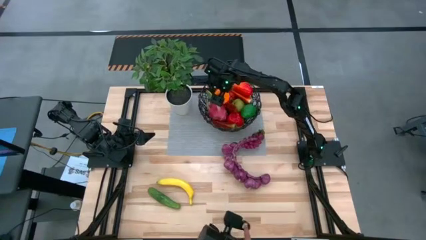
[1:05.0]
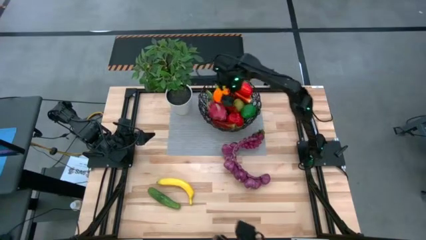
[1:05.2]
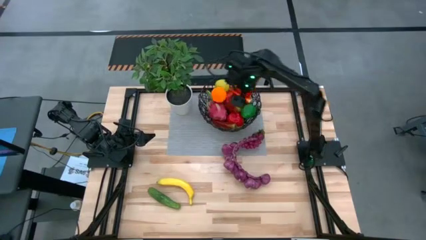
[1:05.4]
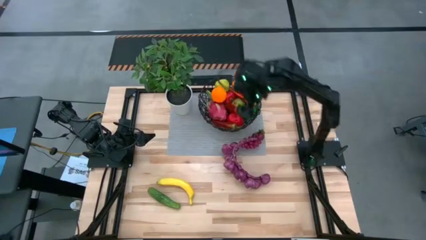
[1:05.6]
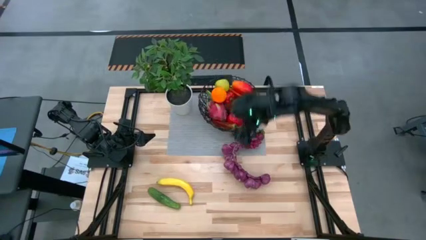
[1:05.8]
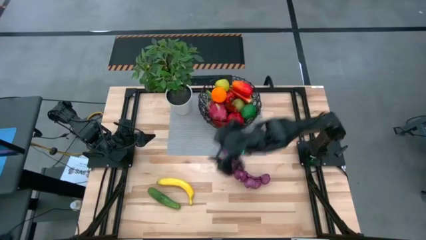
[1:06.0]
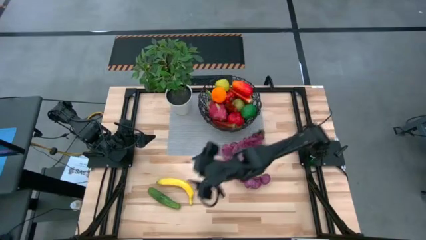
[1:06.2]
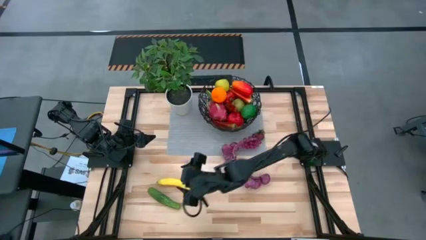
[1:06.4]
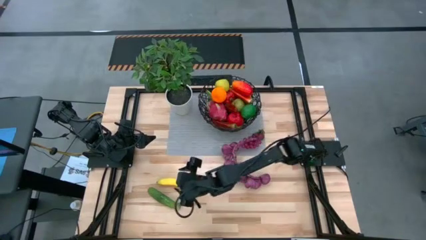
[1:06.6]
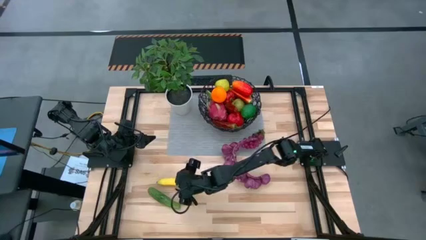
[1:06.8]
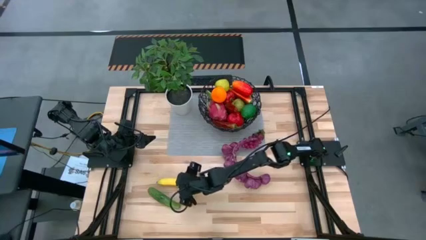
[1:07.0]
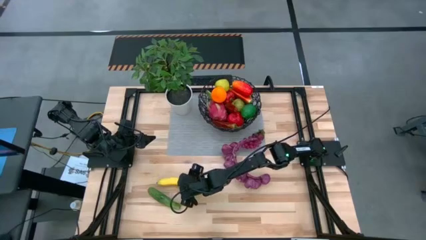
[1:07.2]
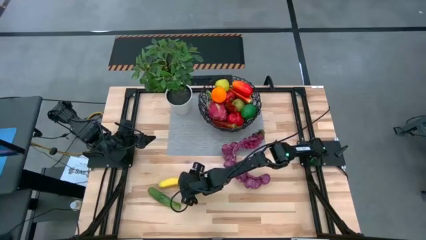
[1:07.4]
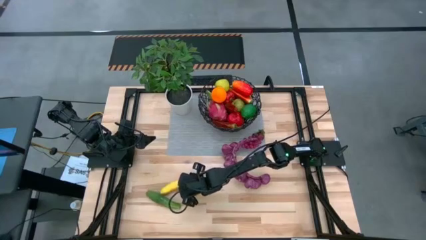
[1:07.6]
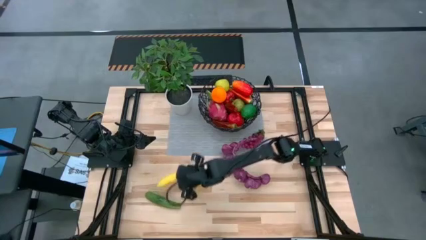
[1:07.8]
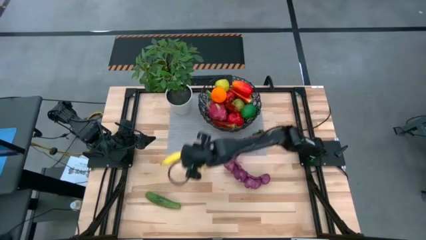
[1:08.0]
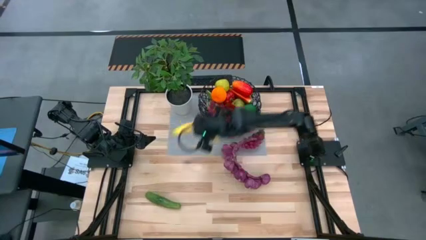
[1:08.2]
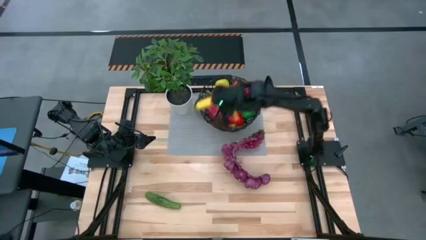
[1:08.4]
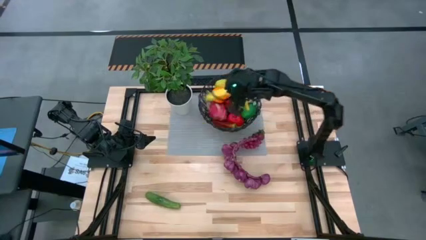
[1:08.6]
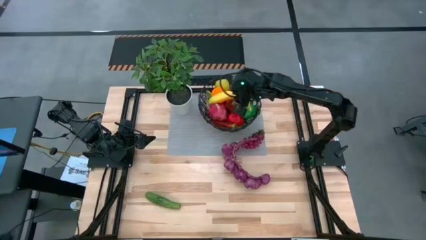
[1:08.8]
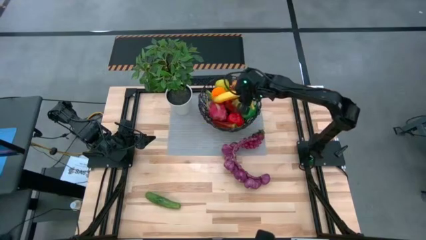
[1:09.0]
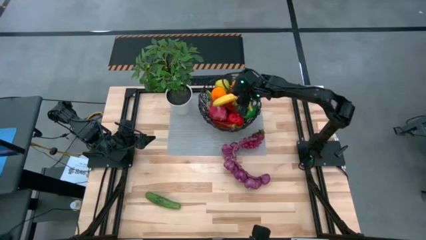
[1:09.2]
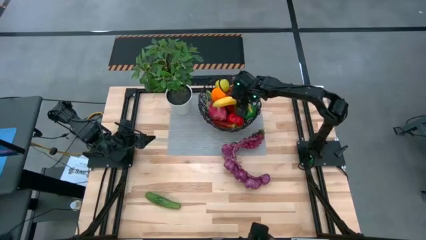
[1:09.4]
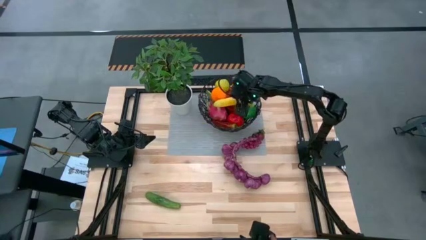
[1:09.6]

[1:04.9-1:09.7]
Task: Build produce basket
Put the yellow banana into the black wire basket

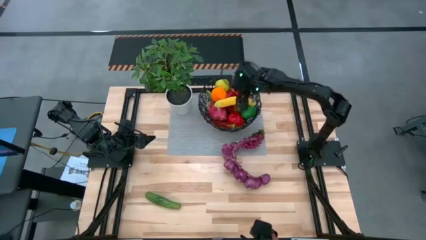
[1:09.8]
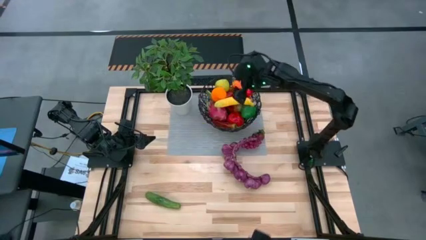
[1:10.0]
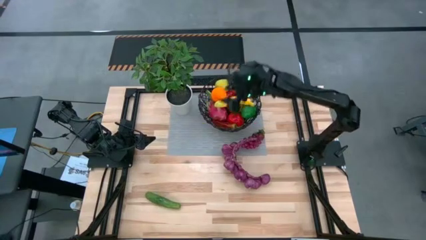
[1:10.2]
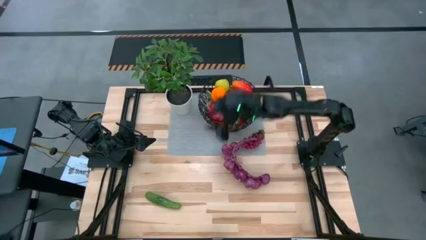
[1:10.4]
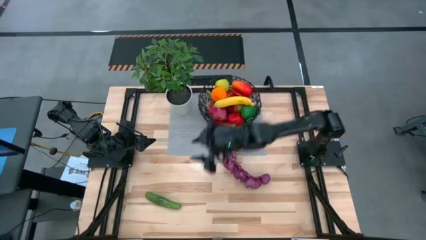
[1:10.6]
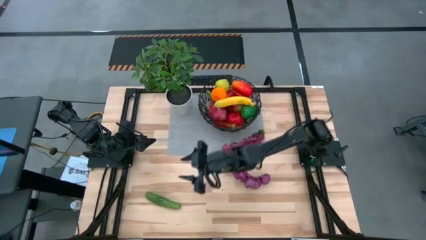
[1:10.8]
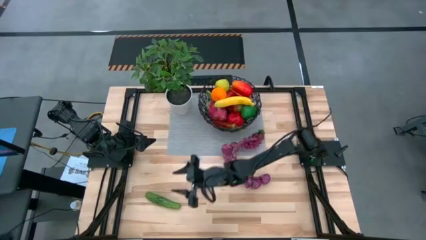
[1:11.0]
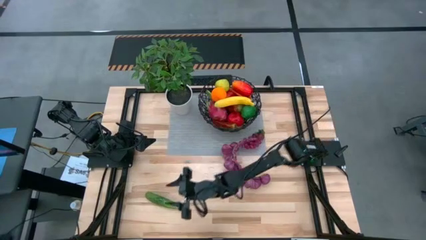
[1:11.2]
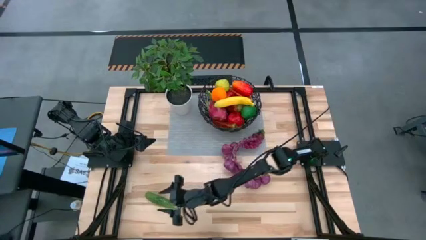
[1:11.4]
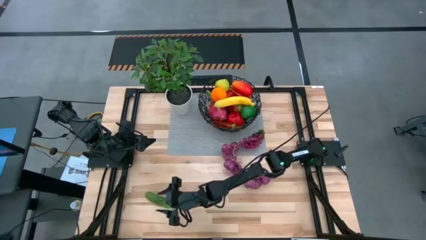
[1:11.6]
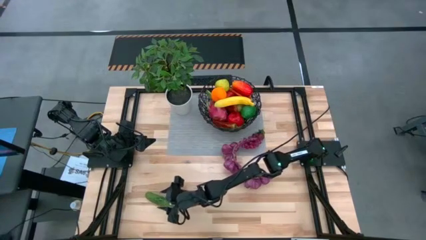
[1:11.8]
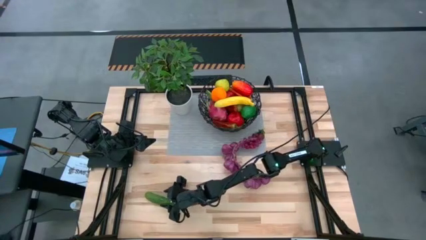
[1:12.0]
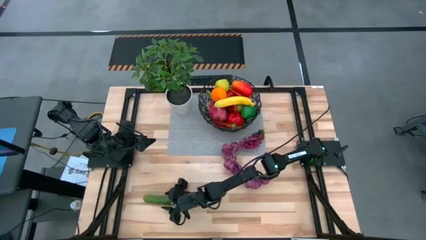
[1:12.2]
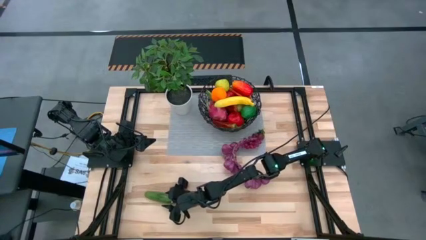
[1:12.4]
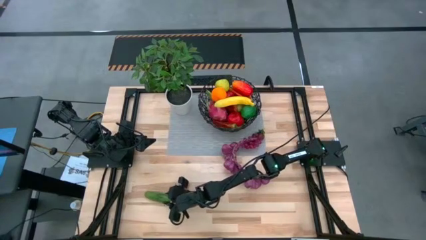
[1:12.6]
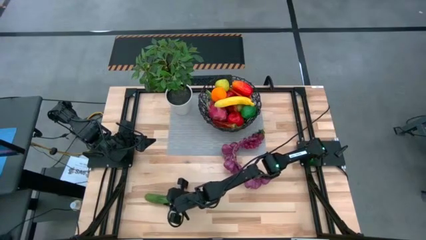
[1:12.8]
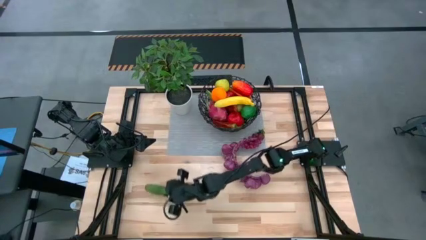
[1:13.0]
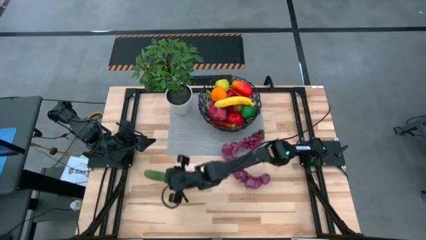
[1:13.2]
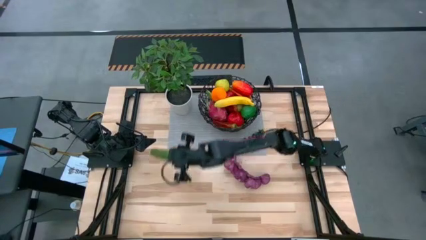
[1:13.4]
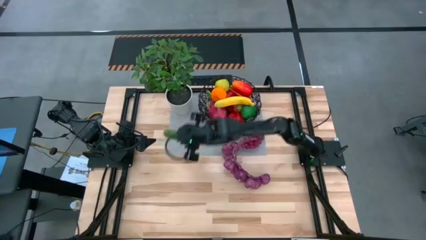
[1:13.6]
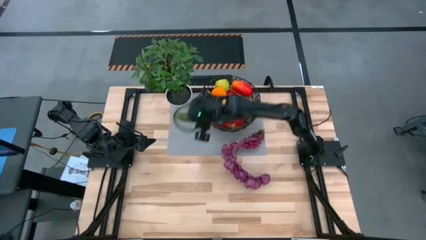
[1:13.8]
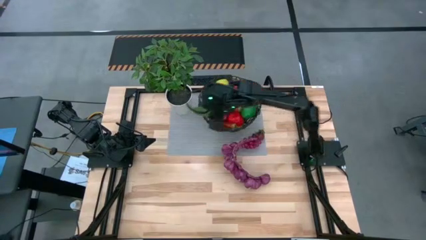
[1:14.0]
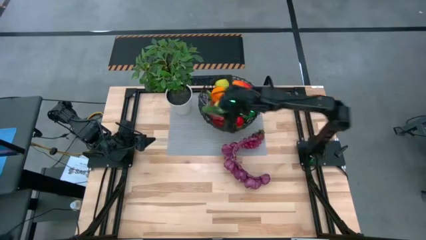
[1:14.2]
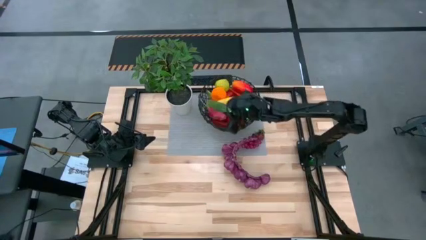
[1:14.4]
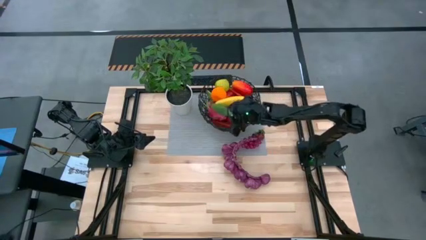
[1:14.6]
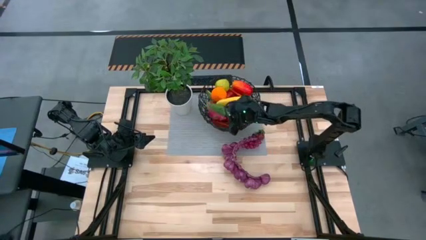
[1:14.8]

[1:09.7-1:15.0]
Put the green cucumber into the black wire basket

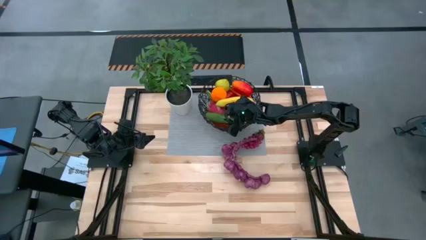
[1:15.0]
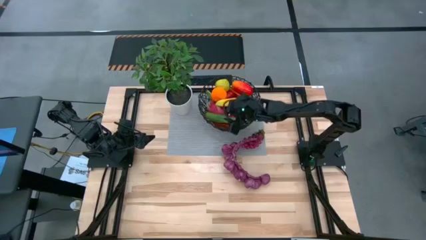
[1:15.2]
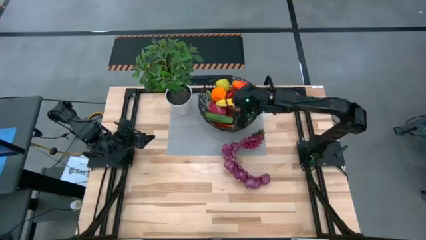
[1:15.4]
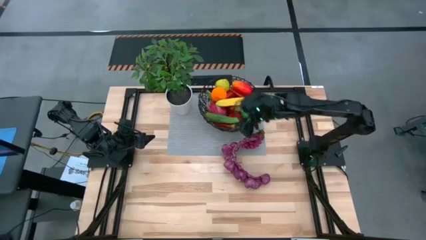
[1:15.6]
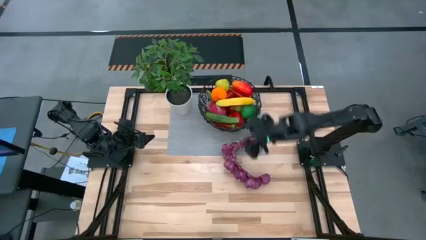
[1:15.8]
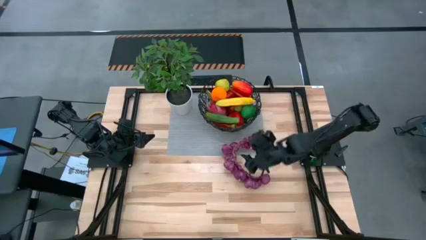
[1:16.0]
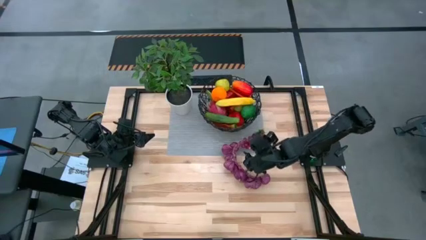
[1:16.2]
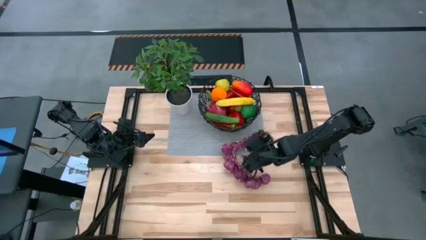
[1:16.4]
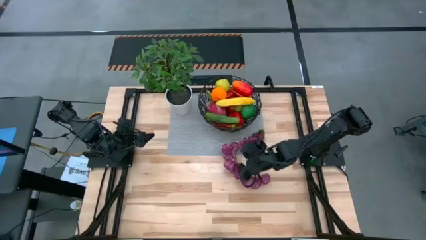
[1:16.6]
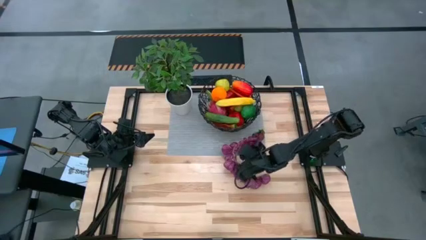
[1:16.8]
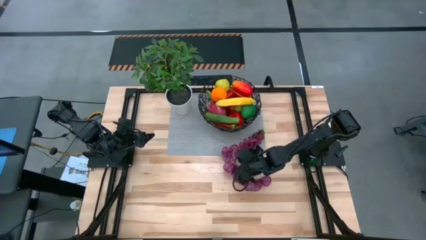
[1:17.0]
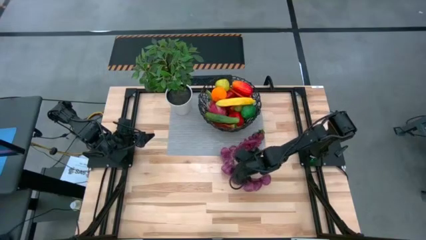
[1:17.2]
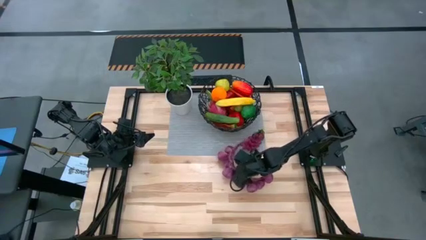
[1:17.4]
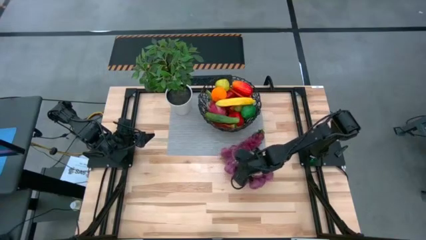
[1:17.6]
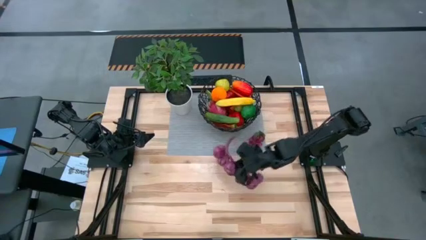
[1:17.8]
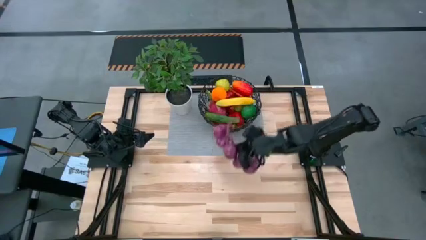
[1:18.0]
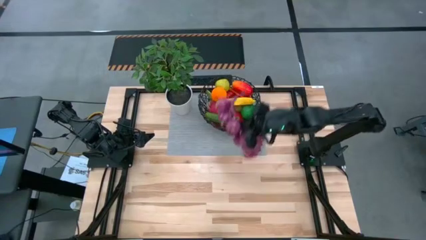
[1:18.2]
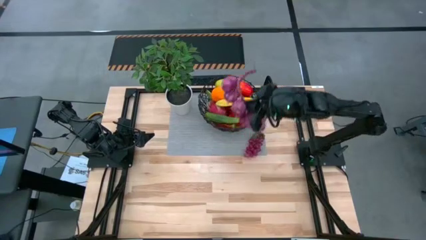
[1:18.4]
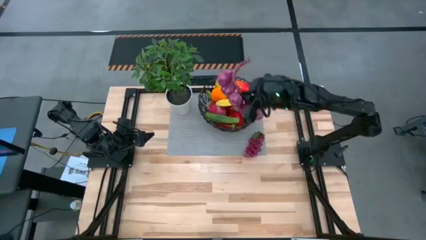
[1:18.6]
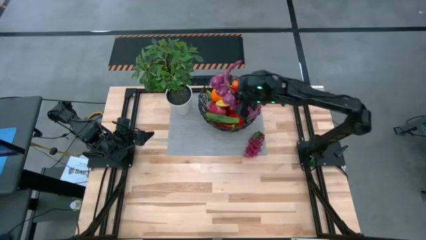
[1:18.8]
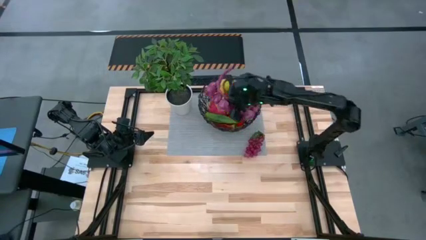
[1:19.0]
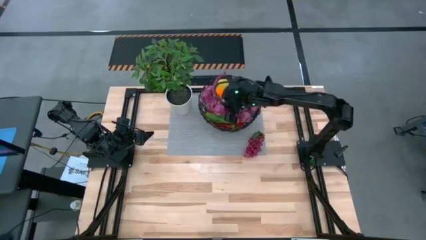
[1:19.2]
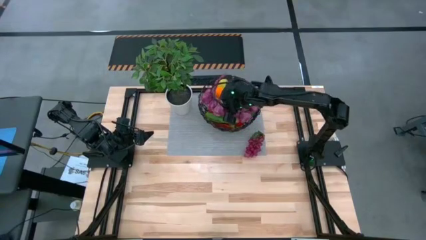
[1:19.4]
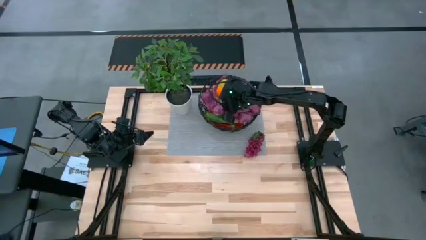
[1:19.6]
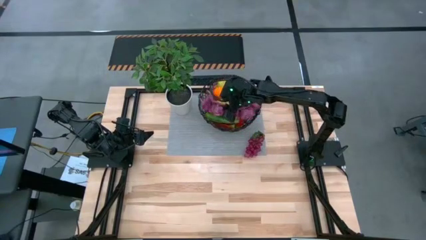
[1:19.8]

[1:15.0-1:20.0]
Put the purple garlic into the black wire basket

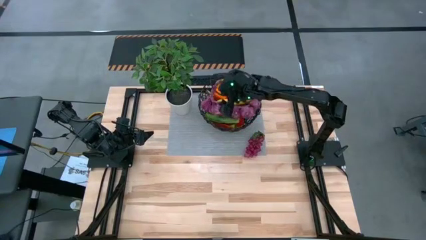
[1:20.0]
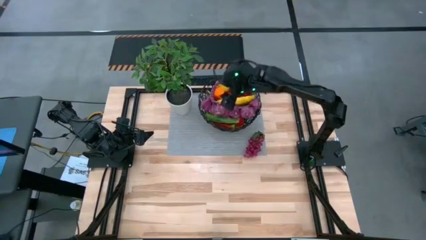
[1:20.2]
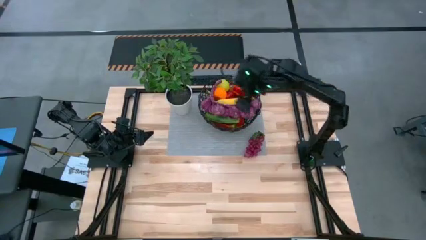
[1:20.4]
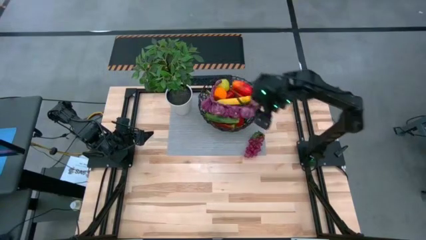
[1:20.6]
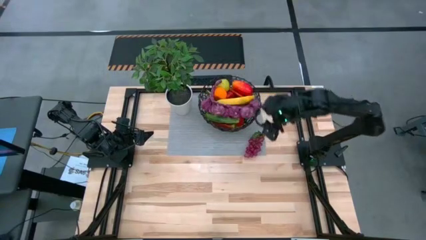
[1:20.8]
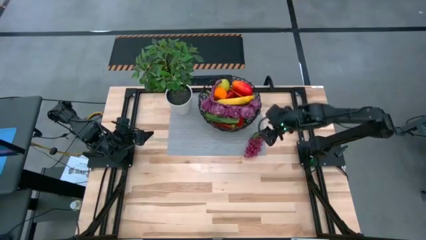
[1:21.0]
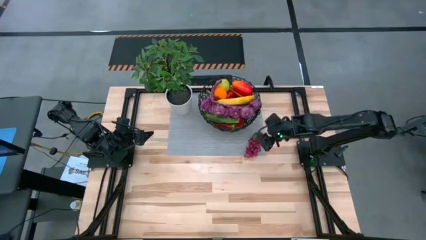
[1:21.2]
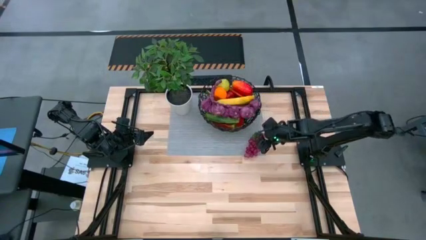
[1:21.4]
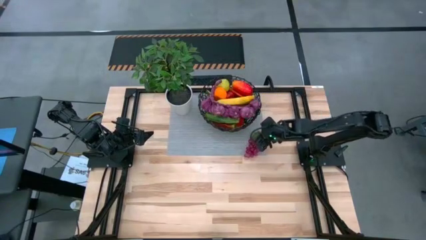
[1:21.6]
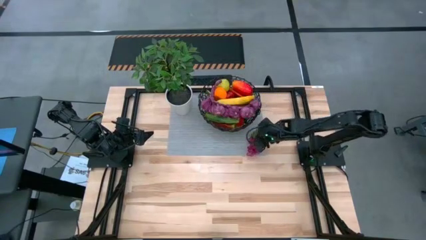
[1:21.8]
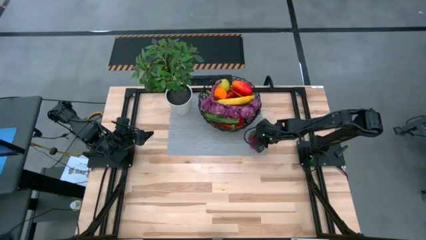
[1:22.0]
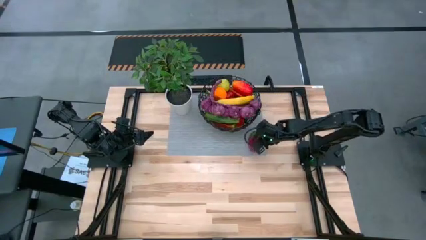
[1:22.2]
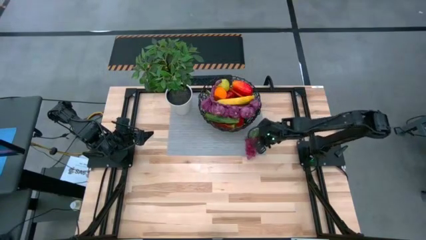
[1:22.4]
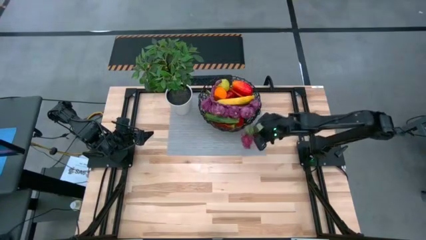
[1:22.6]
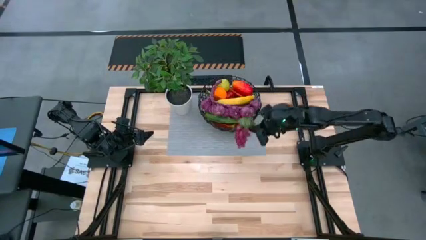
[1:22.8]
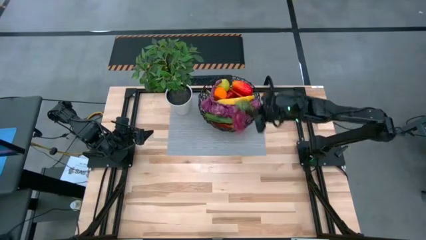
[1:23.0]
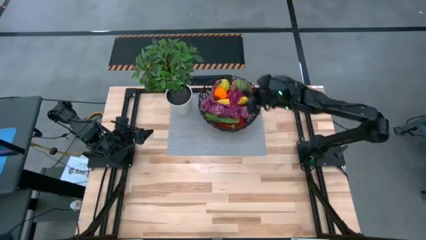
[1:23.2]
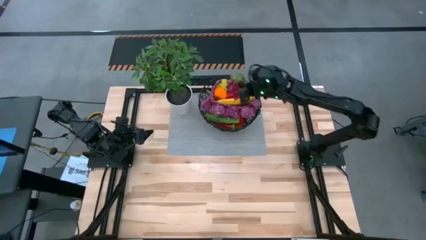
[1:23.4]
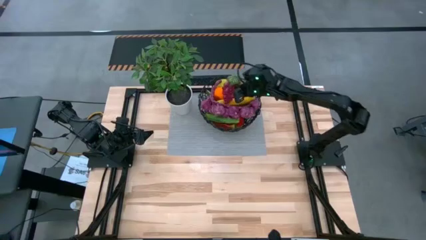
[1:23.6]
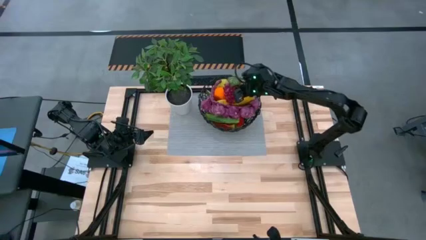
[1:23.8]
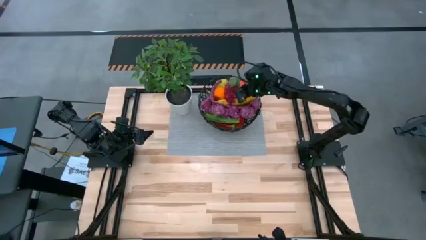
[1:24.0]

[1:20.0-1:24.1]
Put the red grapes into the black wire basket
